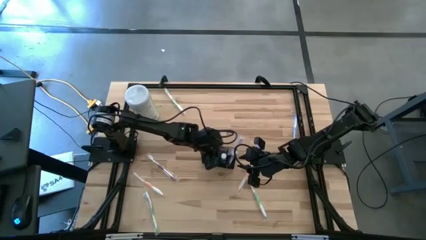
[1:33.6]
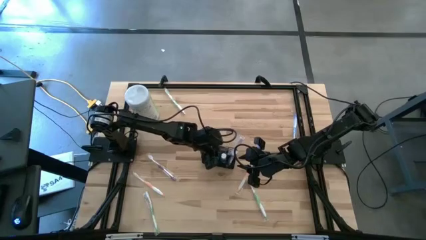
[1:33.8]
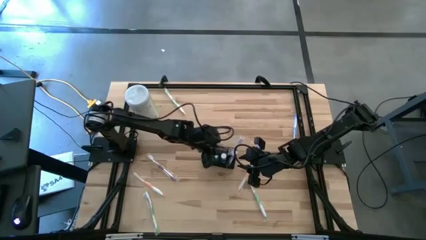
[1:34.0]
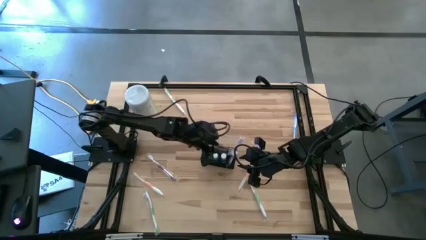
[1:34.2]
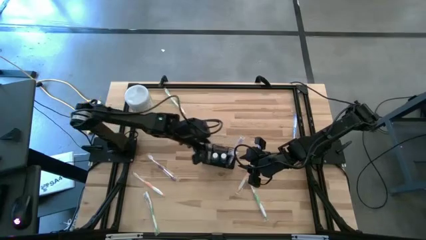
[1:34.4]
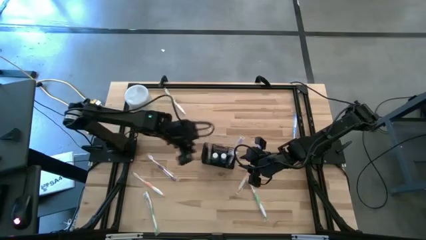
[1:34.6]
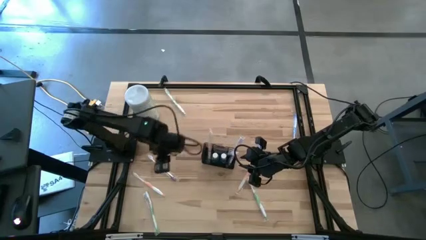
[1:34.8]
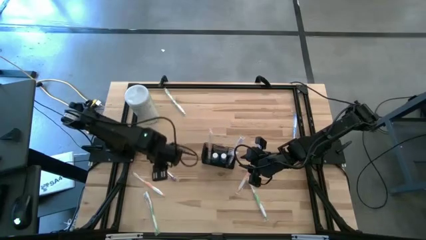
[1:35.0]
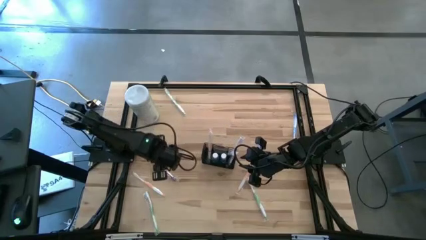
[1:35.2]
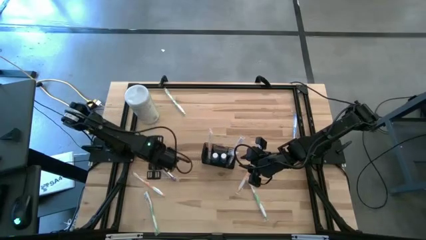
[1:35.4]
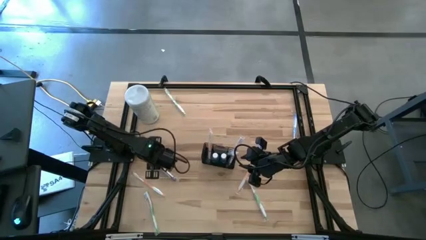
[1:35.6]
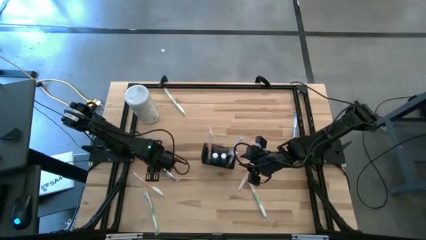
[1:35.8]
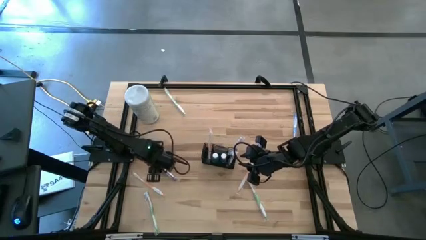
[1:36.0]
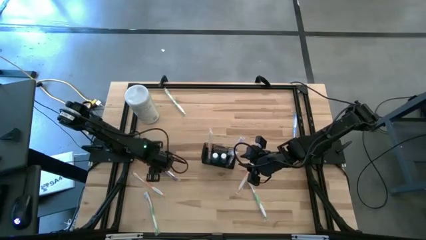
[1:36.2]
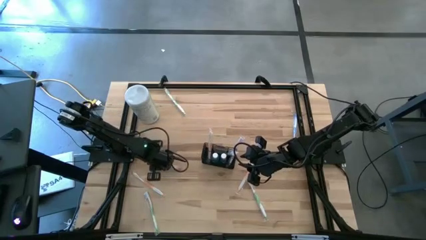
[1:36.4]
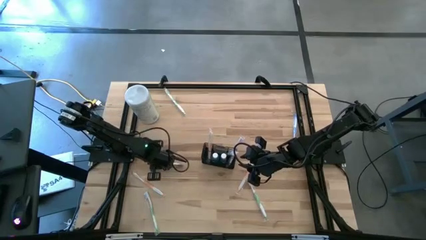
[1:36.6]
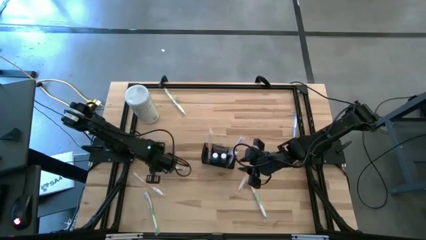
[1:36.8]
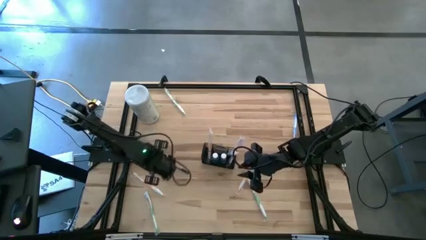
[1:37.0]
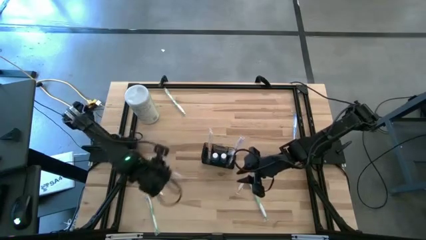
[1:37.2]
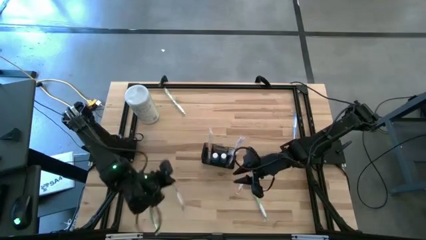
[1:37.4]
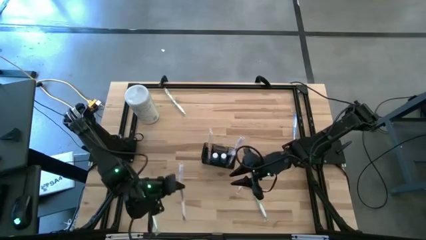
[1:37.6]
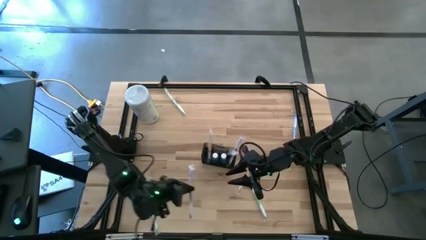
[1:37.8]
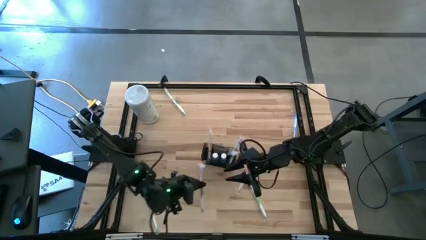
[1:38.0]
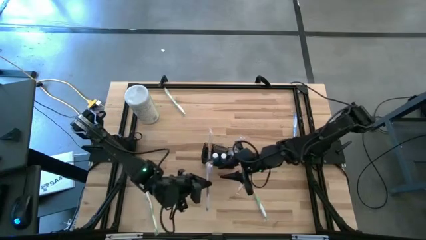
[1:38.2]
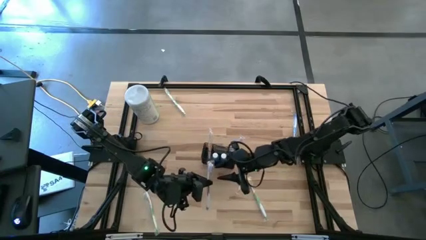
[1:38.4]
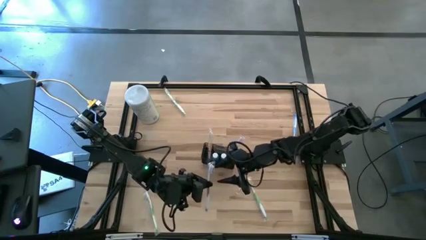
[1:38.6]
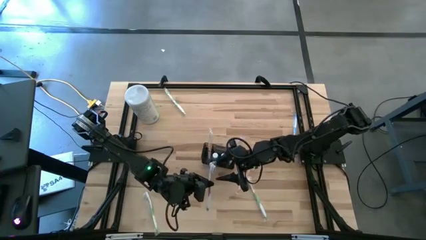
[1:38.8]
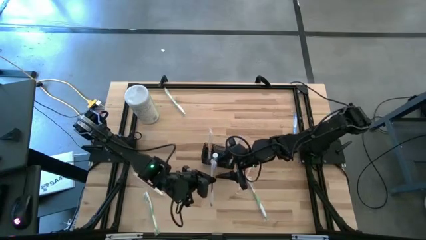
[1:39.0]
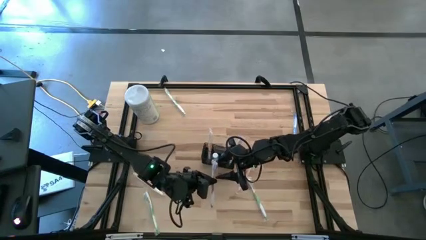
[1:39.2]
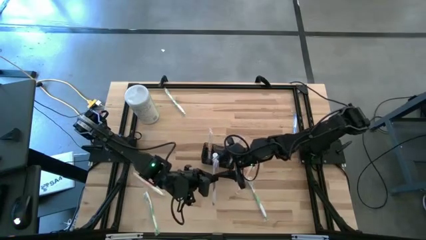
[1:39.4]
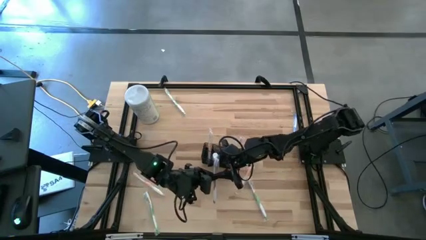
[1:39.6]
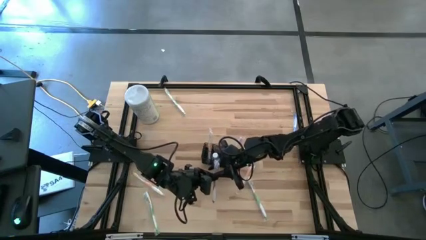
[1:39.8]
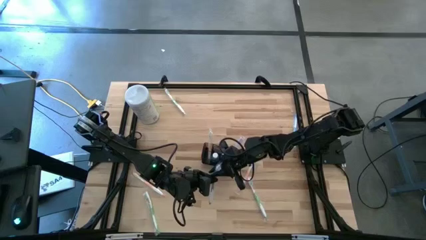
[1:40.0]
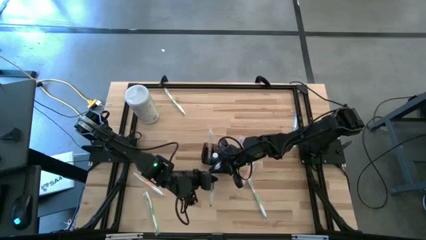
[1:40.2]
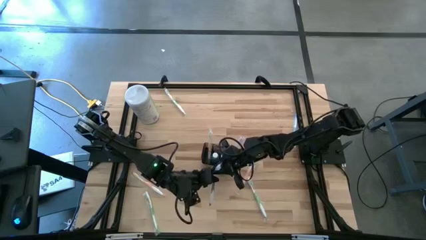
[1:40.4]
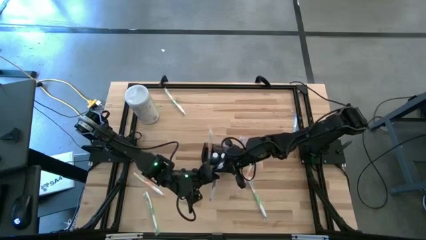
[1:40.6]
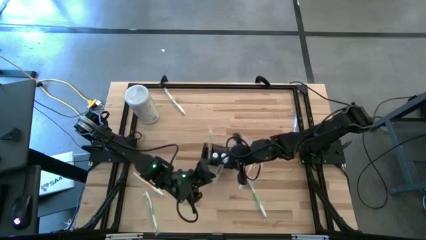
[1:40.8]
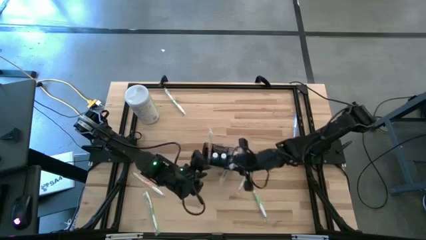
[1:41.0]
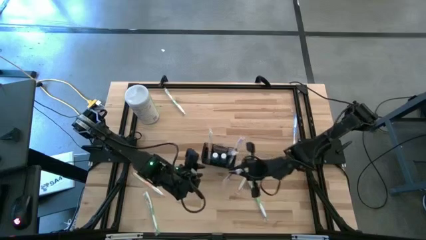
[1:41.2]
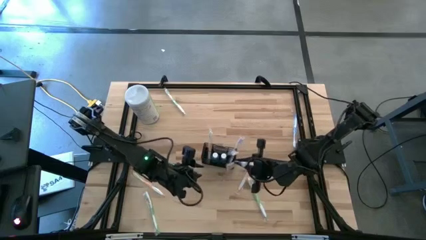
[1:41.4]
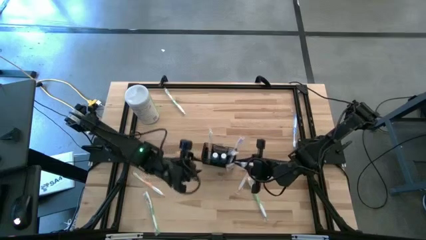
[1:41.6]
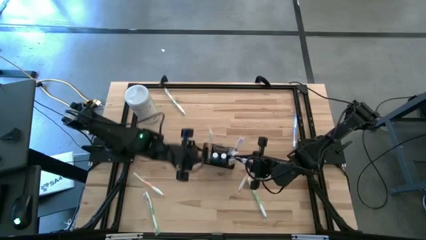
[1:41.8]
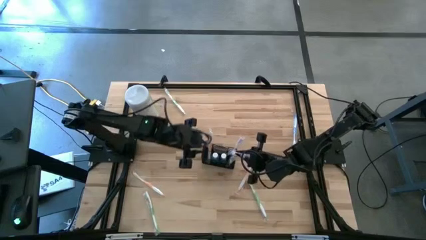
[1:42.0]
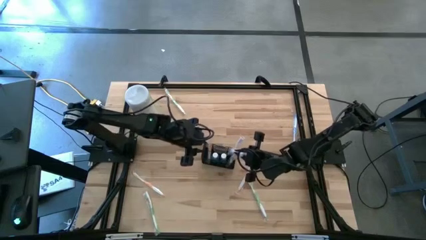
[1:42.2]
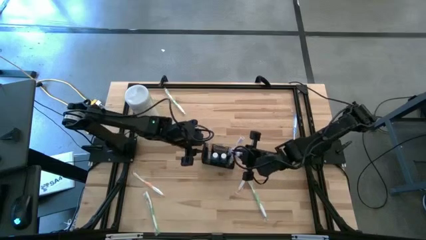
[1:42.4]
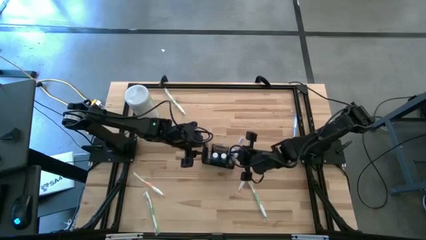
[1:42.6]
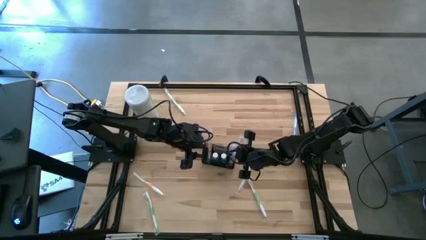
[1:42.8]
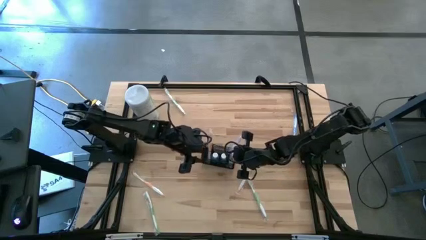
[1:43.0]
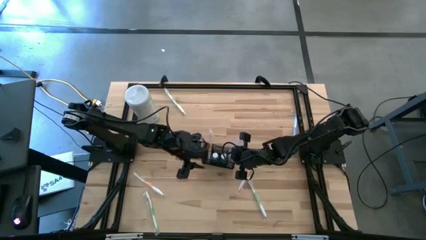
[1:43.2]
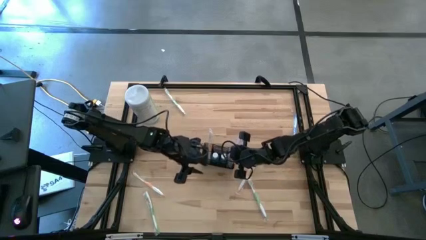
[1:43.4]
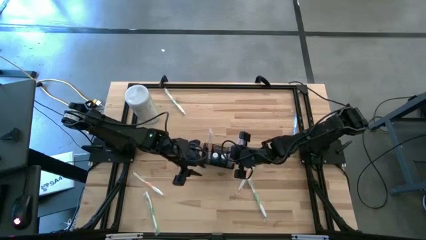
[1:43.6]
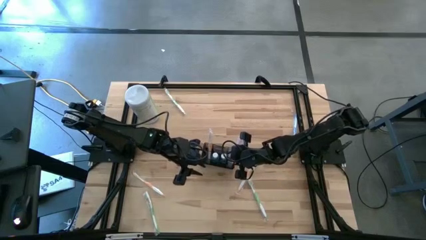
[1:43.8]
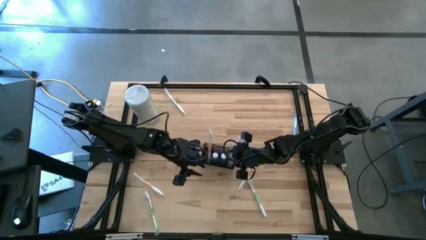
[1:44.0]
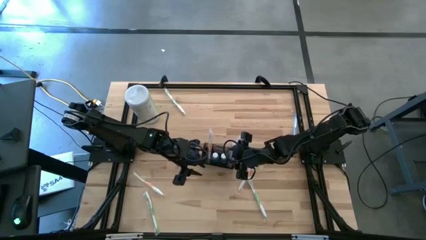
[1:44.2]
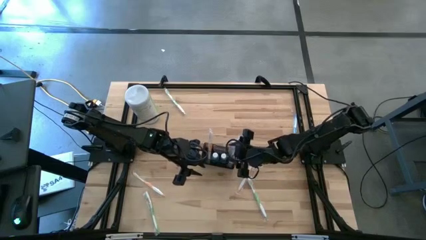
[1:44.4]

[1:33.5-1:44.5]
Task: Pick & Place toothbrushing station
Put the purple toothbrush into the toothbrush organizer
